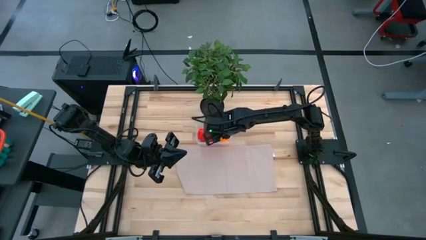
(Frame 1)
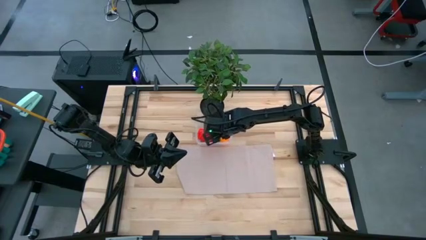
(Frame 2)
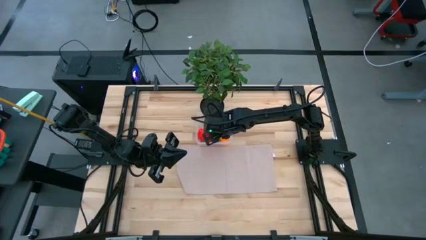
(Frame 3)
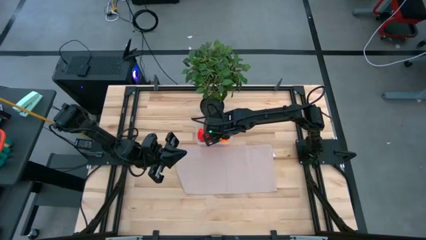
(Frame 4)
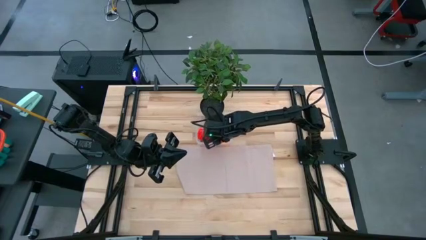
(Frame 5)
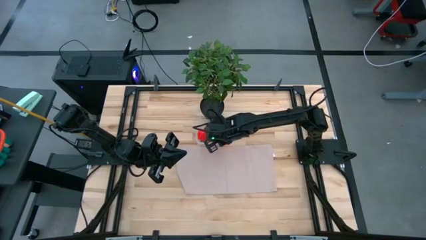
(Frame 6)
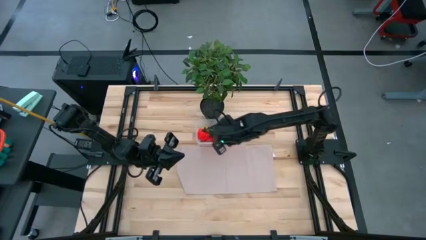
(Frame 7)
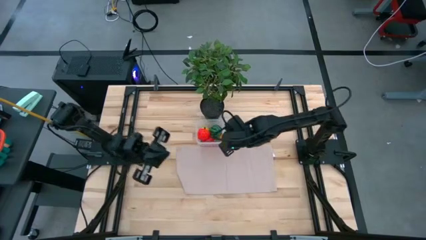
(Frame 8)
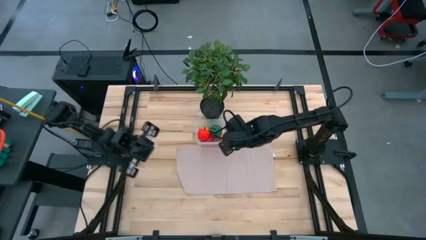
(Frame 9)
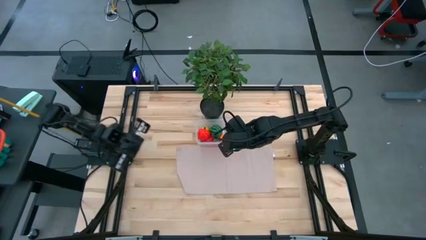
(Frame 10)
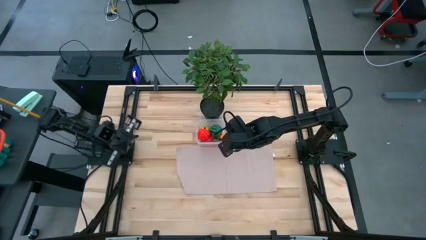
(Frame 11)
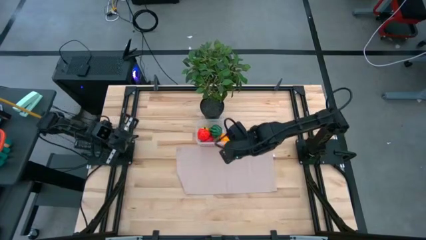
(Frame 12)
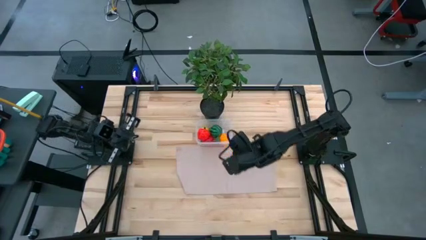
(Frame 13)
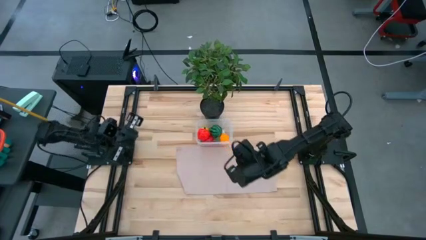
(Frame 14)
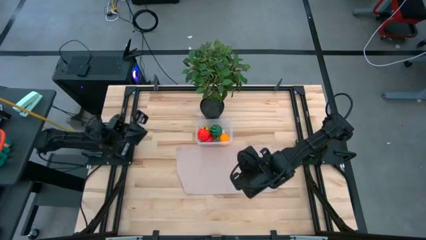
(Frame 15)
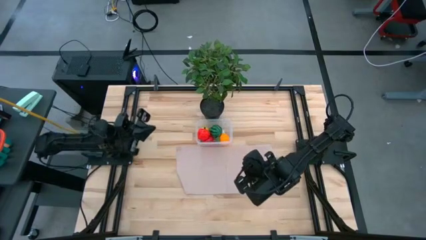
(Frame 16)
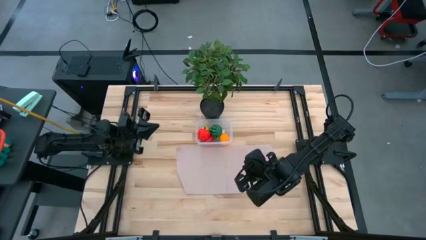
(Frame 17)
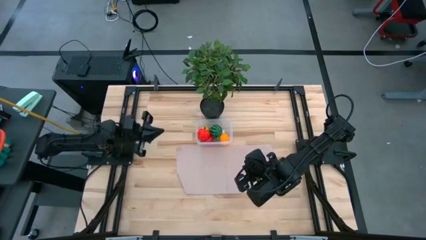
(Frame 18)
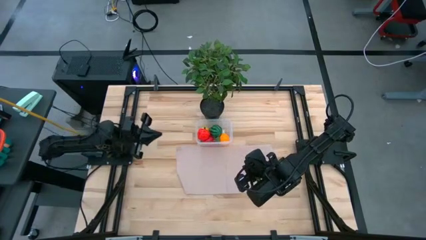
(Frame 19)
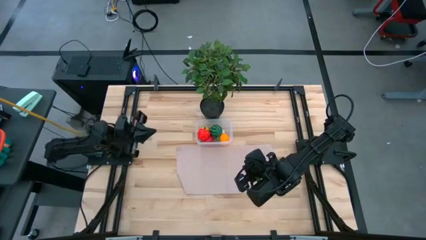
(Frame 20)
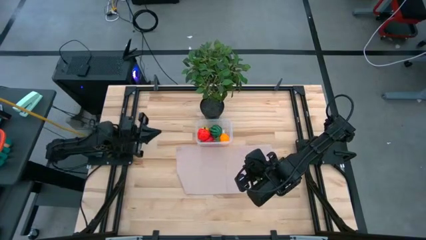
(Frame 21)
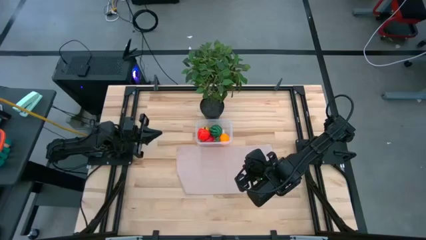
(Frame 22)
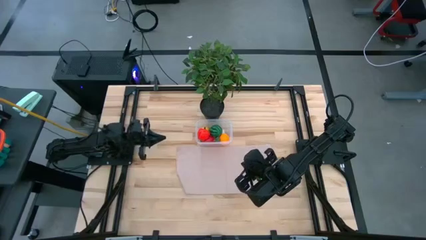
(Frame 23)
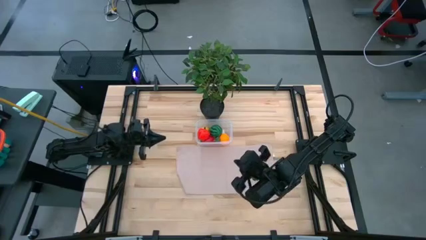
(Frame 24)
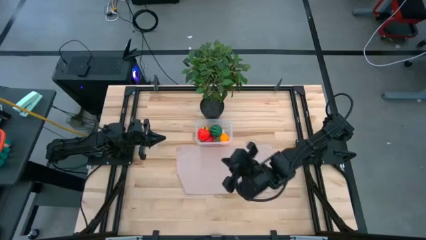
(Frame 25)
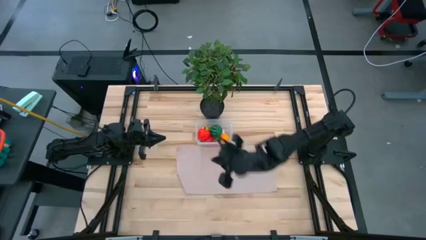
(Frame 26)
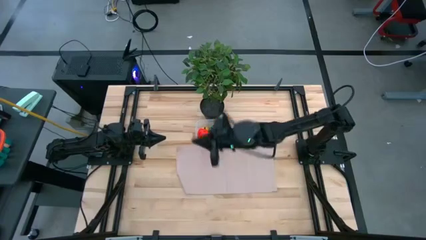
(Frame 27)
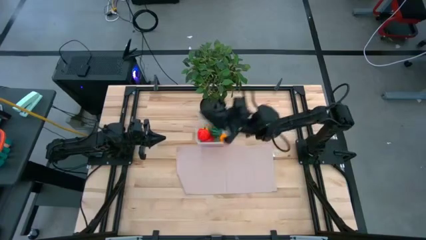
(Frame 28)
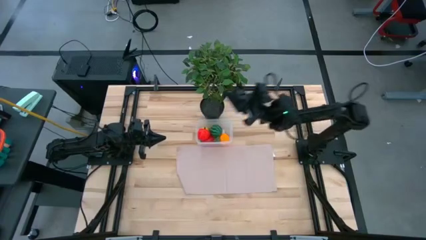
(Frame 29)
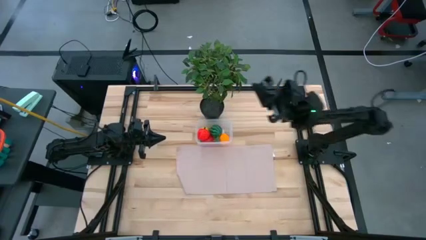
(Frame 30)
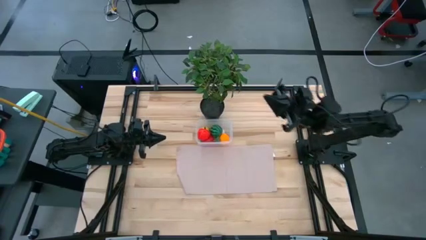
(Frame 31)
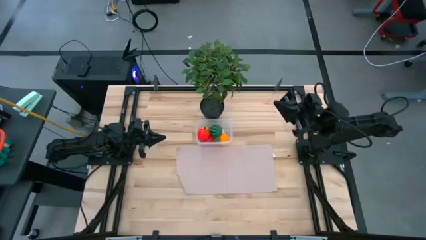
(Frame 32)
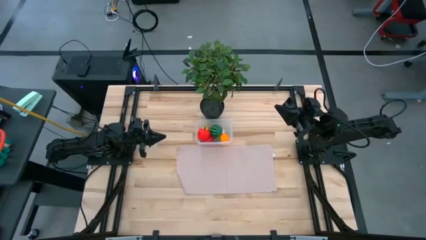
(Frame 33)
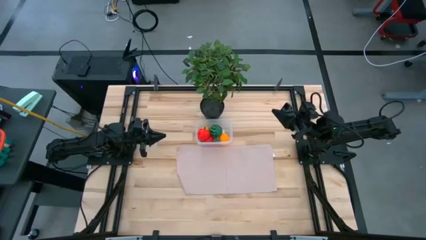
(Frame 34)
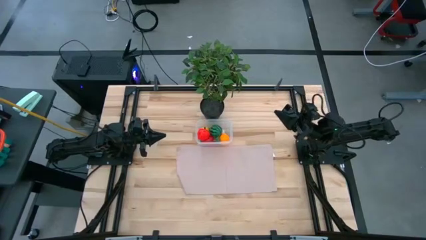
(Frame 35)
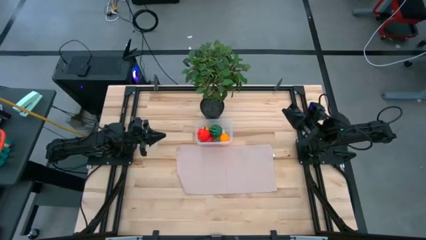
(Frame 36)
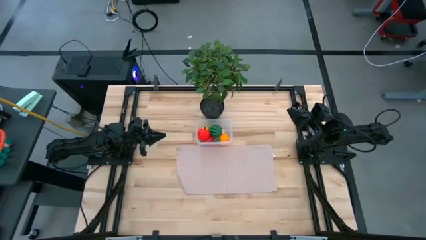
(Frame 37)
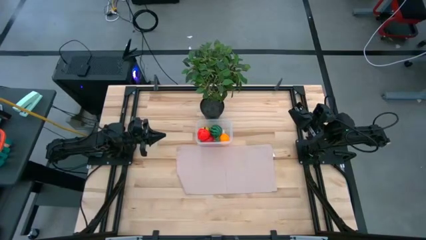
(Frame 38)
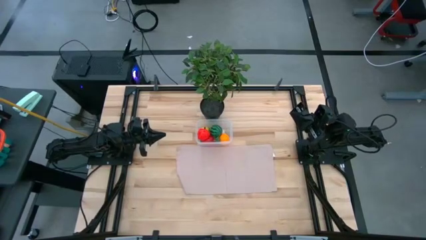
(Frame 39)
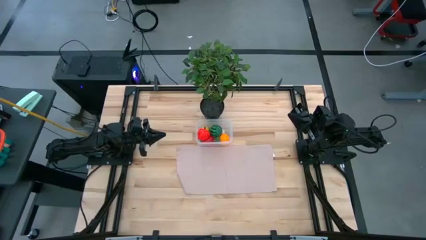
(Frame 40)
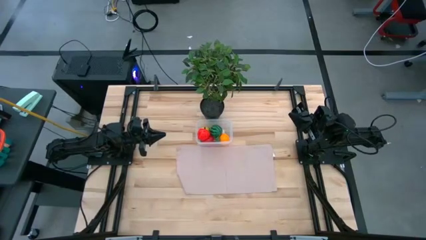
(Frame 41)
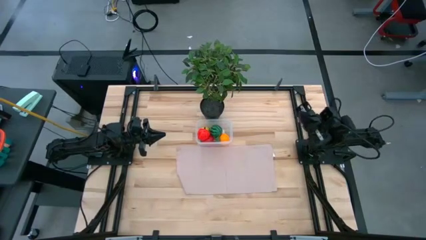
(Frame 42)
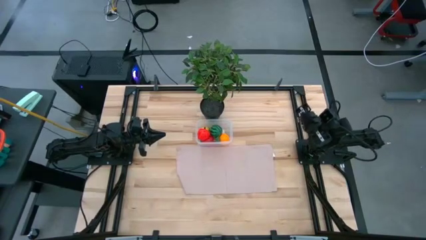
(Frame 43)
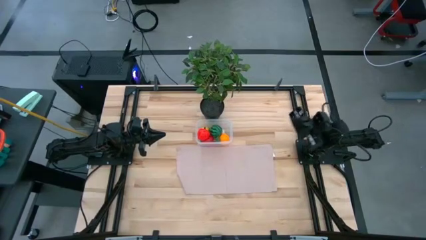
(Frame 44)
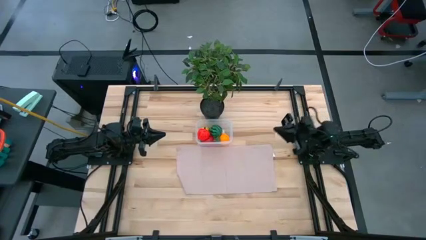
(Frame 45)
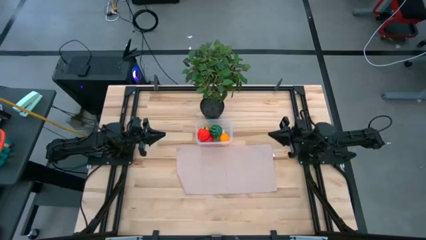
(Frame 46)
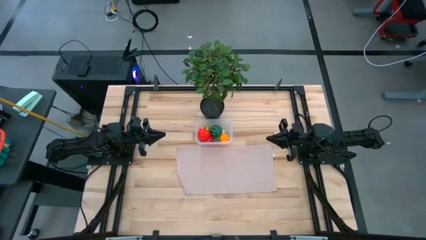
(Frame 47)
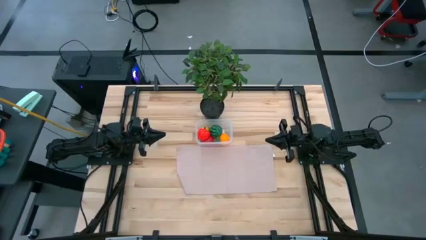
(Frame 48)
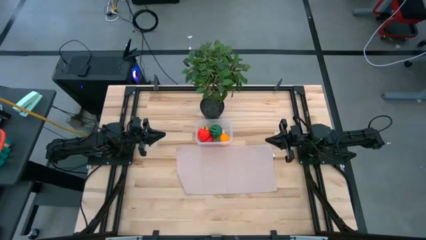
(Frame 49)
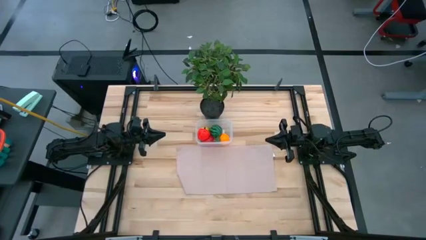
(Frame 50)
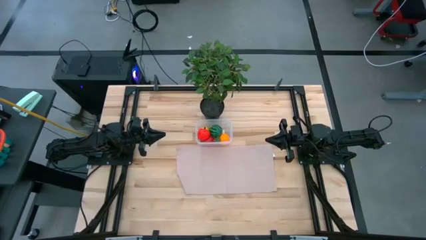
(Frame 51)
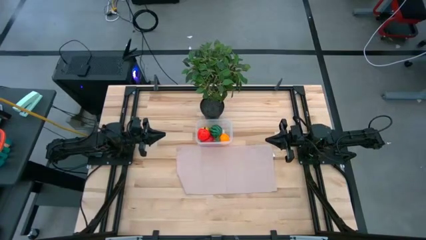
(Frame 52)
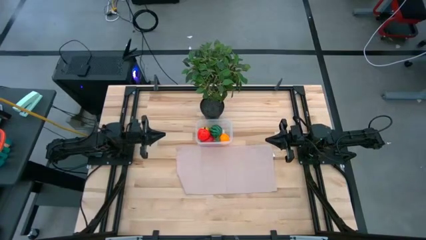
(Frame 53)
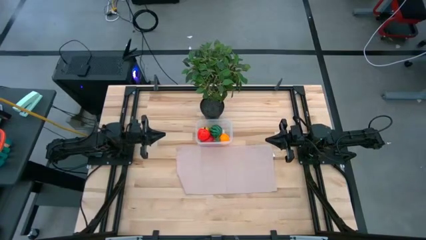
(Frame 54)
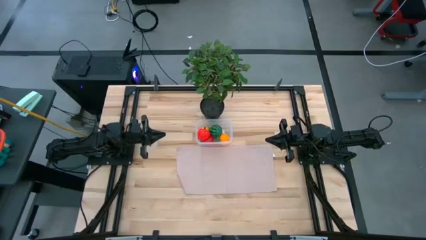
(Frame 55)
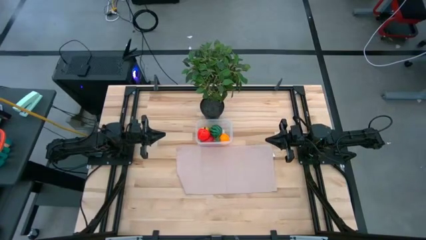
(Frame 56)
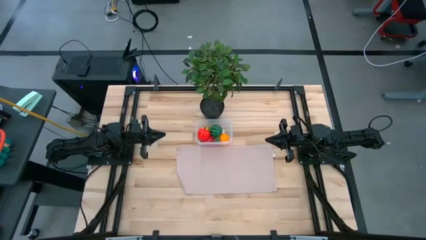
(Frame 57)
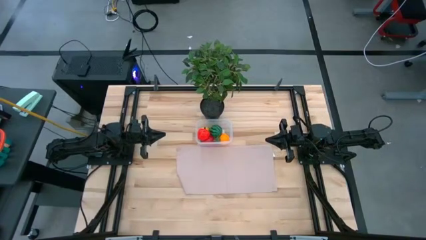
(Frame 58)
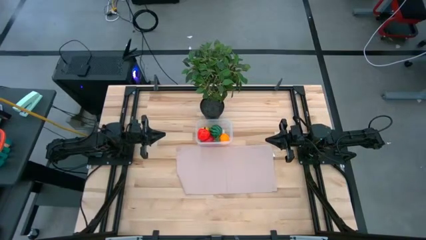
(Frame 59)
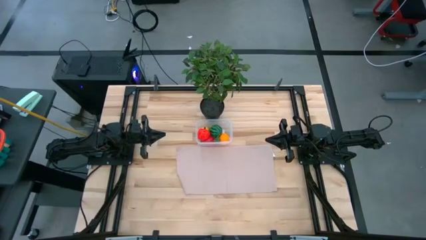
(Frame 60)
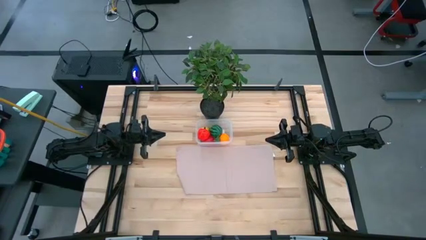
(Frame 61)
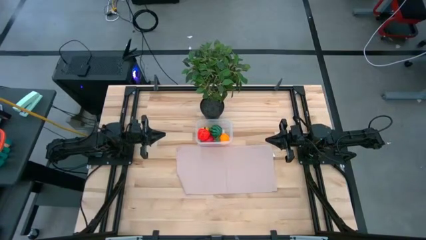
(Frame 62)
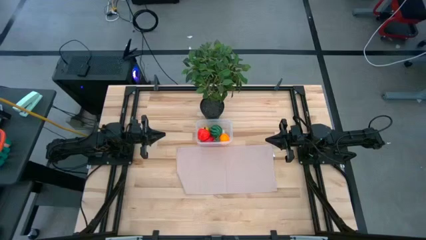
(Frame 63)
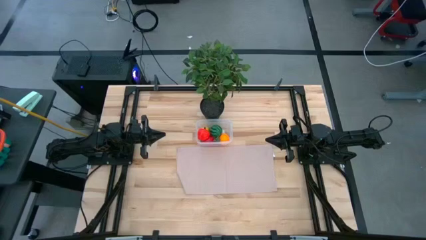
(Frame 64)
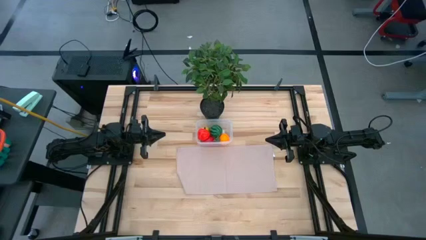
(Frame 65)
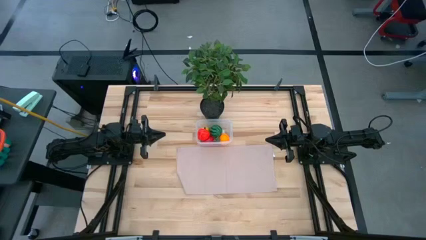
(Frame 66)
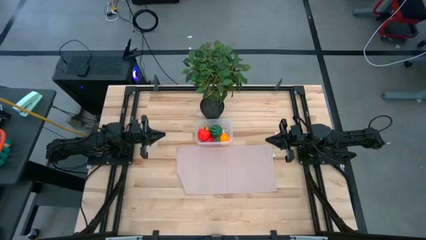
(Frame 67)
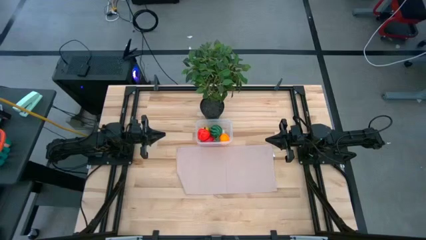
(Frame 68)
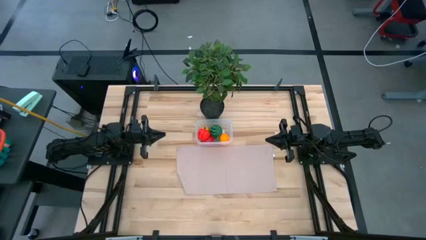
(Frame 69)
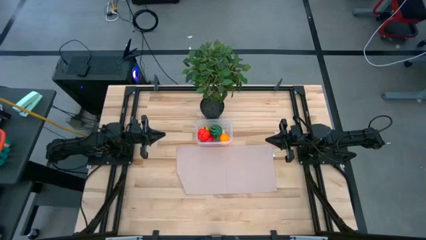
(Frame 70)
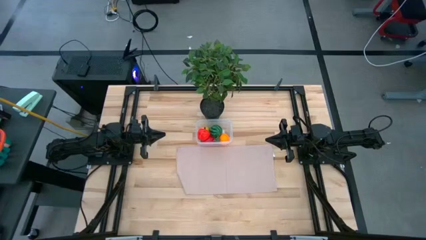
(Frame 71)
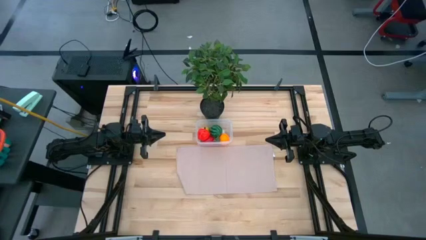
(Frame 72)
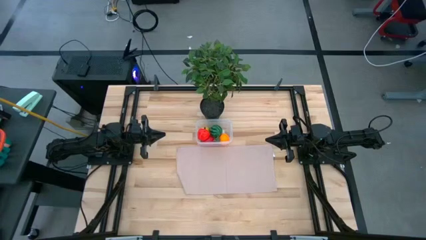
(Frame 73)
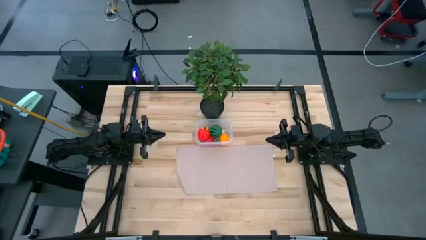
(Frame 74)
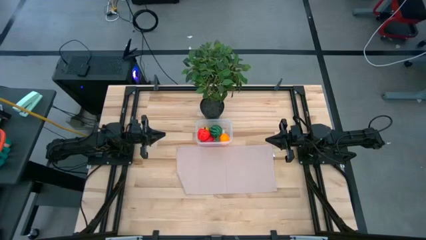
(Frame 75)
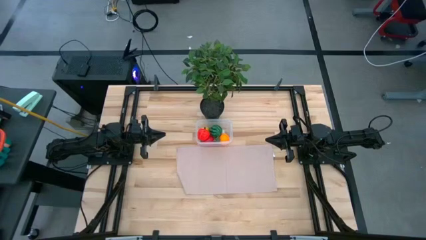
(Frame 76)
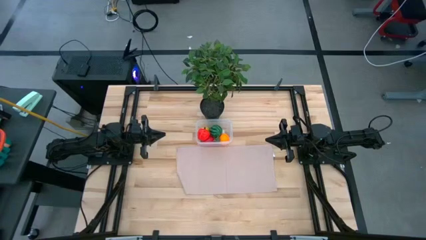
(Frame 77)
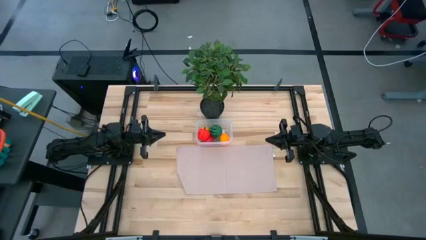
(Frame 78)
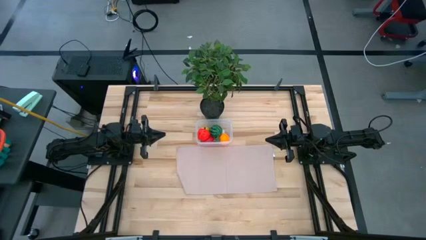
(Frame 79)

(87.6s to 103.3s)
Task: Pick and placing Produce into tupperware
Return to Home Position

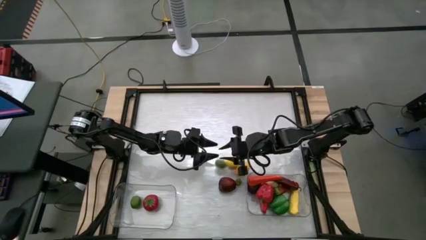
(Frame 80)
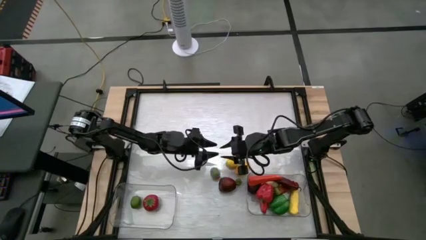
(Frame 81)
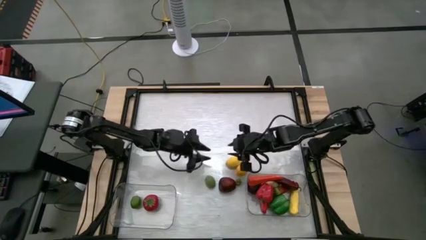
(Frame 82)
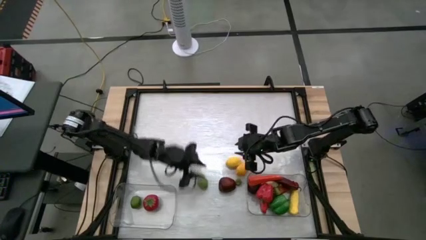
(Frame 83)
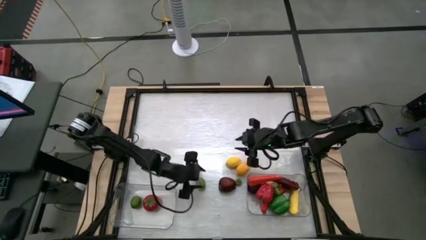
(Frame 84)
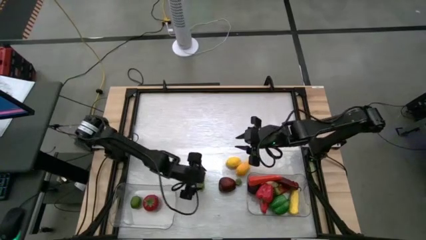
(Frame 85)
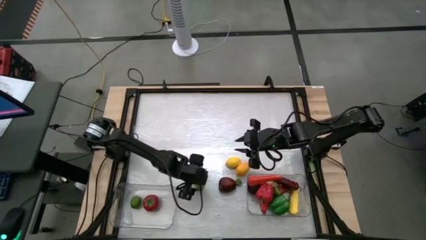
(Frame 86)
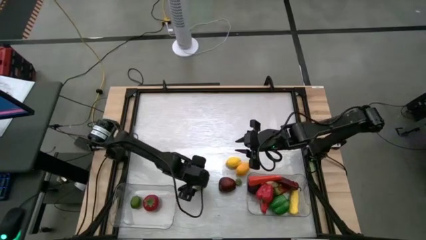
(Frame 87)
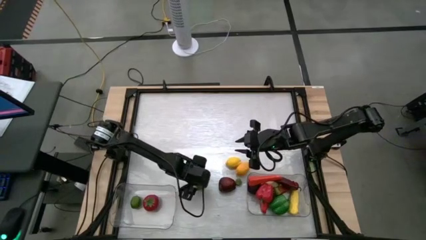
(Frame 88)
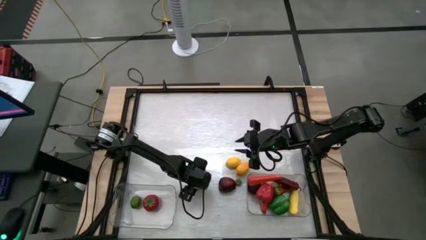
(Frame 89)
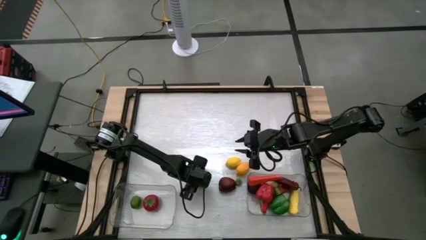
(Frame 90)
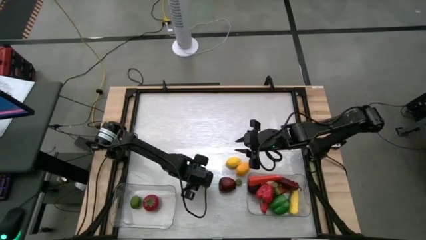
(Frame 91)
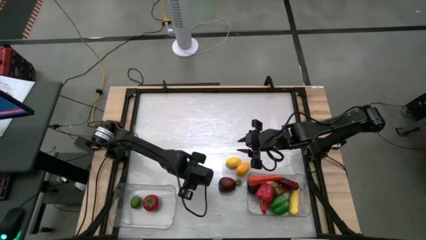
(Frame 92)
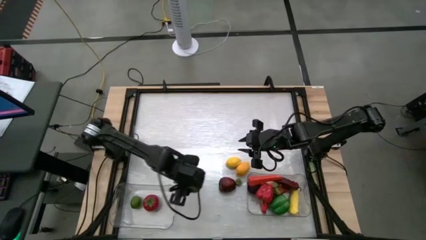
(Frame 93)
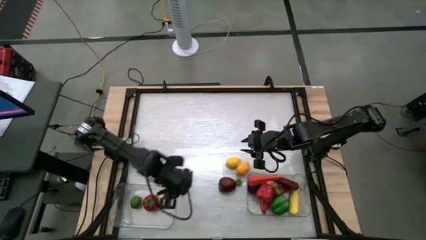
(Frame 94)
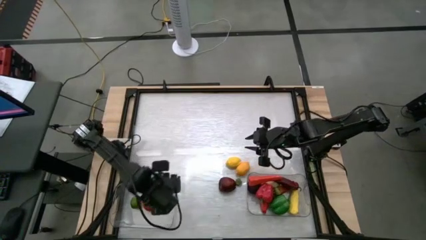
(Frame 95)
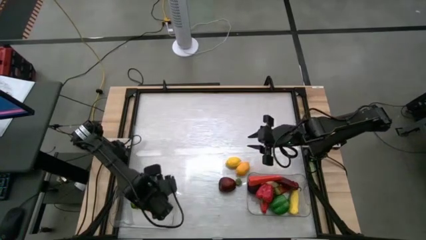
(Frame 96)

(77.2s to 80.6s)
Task: Sort produce into baskets
Put the lime into the left transparent bin
